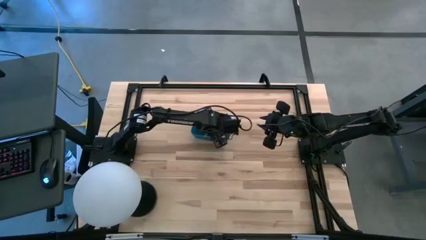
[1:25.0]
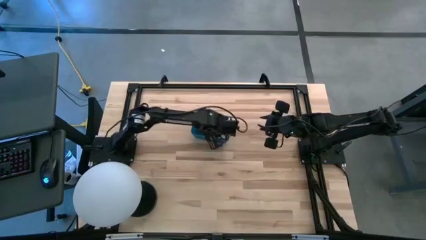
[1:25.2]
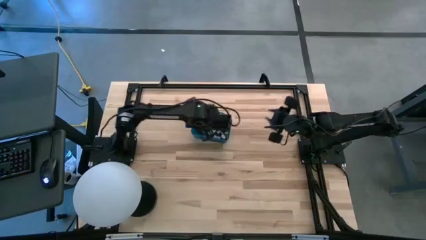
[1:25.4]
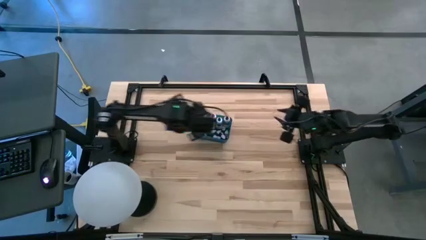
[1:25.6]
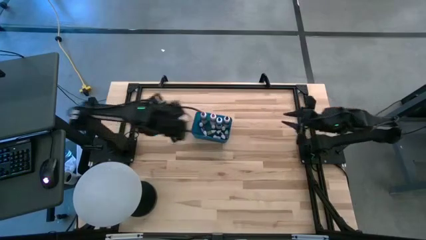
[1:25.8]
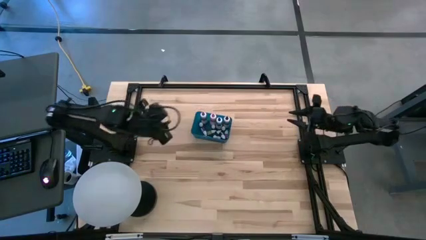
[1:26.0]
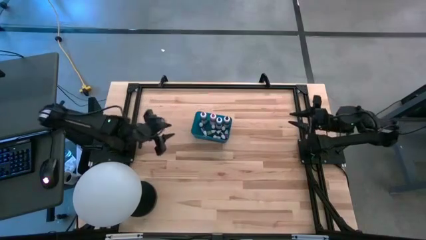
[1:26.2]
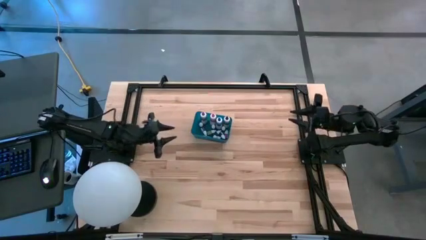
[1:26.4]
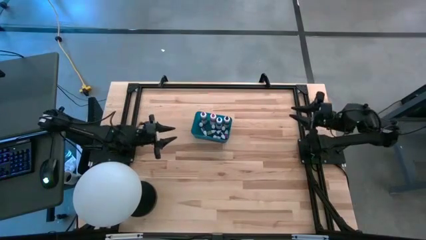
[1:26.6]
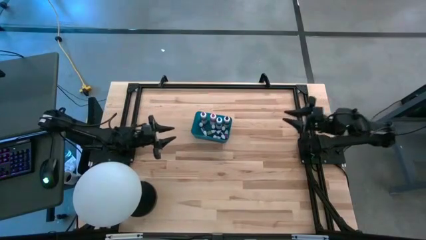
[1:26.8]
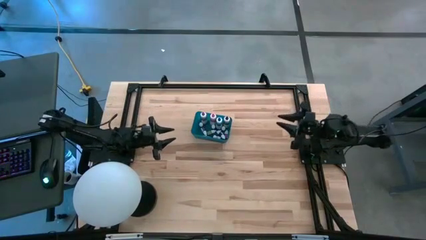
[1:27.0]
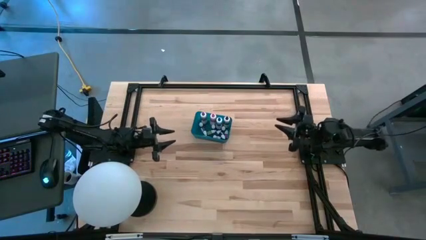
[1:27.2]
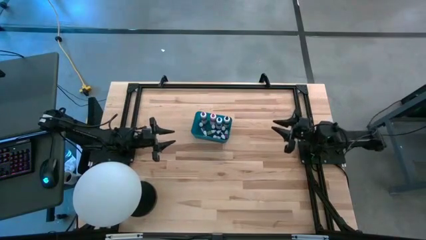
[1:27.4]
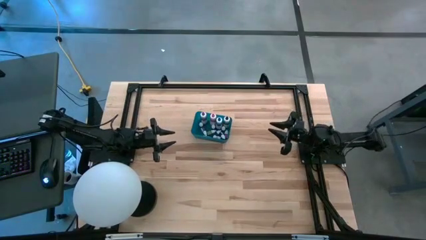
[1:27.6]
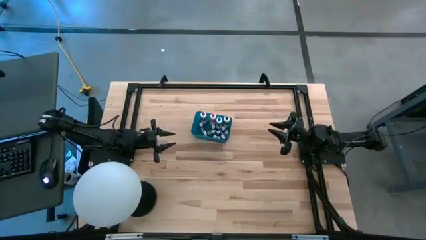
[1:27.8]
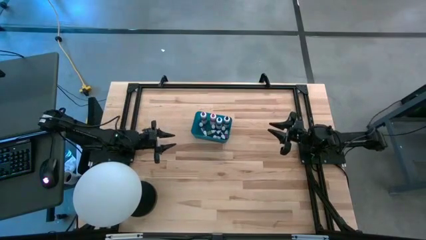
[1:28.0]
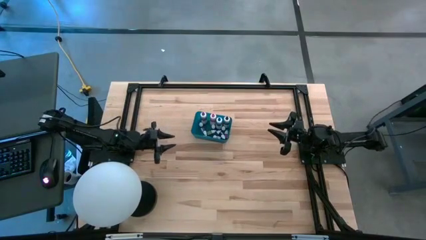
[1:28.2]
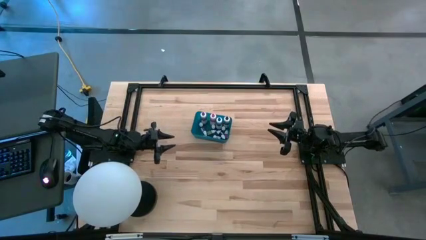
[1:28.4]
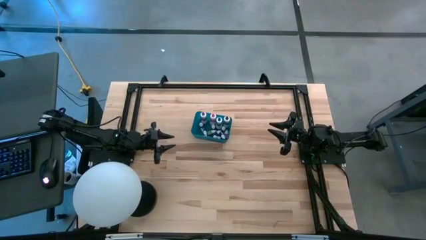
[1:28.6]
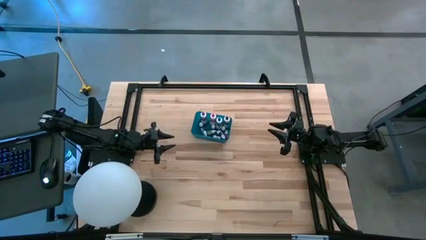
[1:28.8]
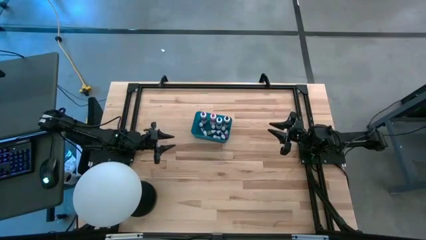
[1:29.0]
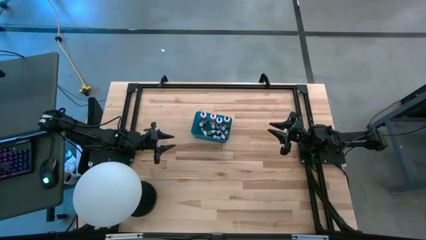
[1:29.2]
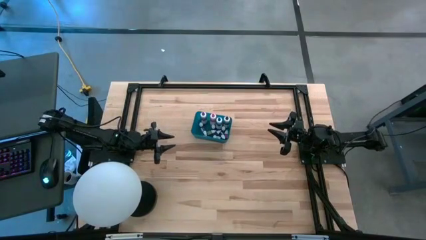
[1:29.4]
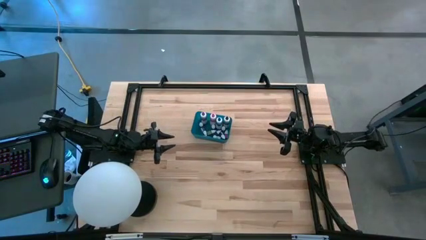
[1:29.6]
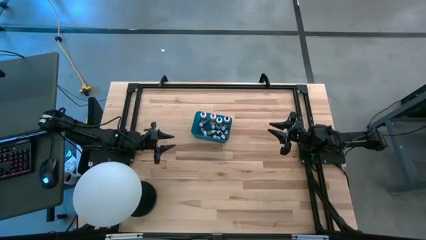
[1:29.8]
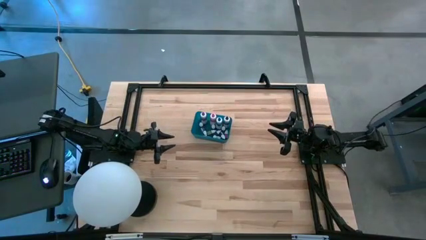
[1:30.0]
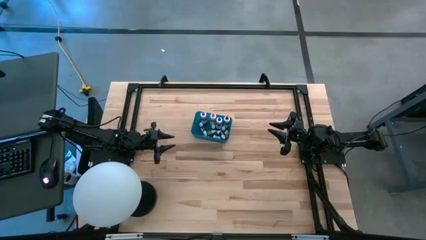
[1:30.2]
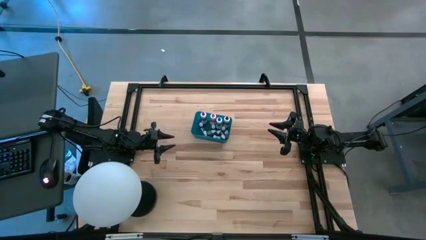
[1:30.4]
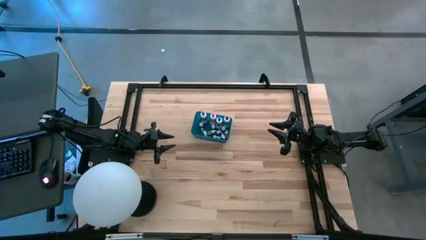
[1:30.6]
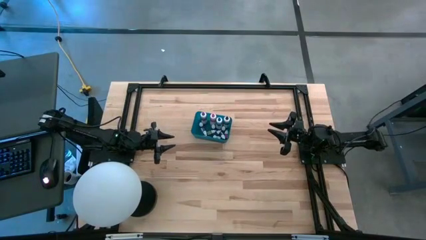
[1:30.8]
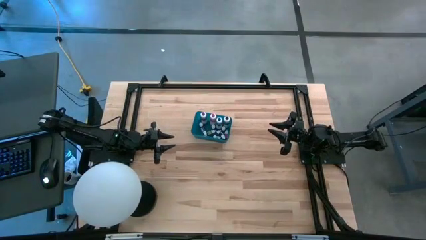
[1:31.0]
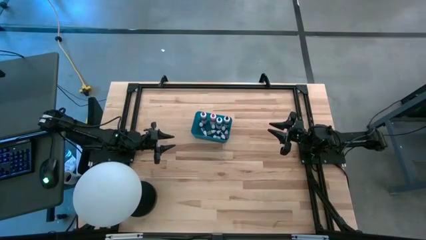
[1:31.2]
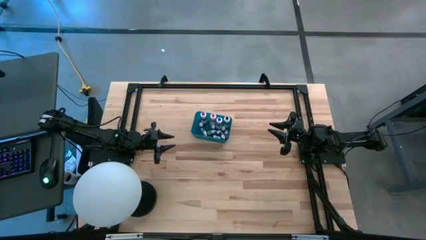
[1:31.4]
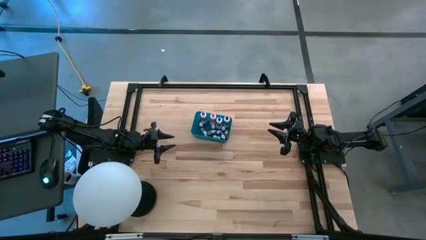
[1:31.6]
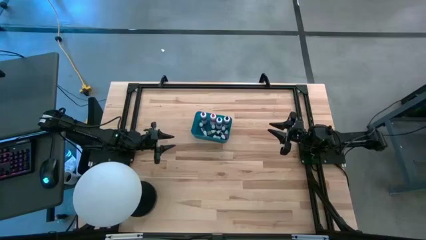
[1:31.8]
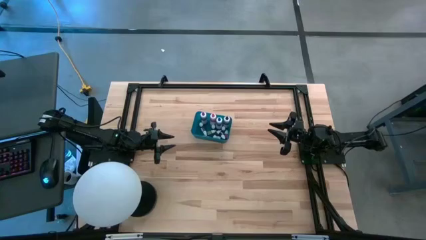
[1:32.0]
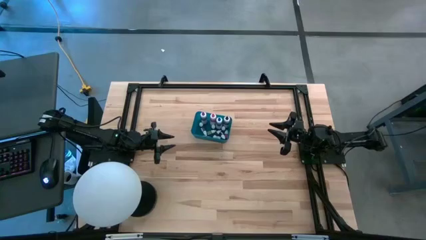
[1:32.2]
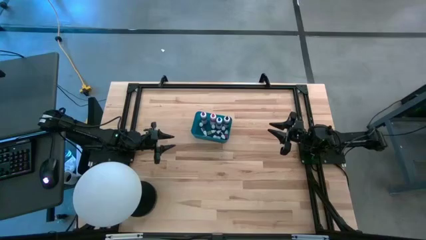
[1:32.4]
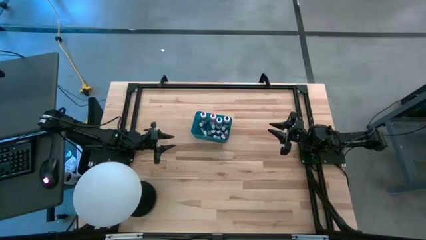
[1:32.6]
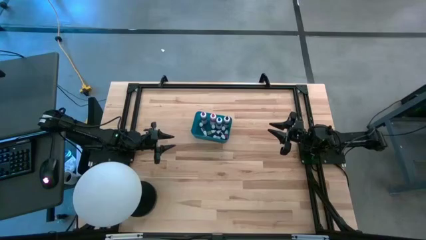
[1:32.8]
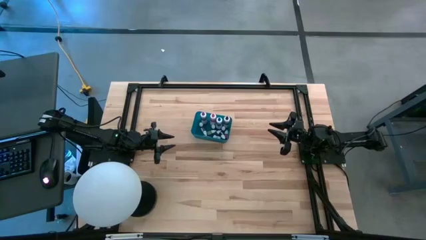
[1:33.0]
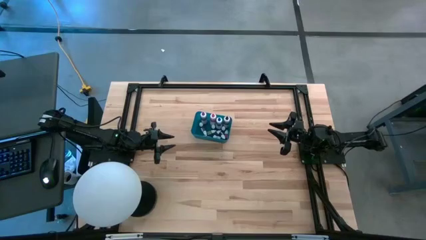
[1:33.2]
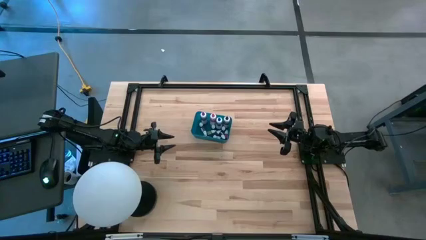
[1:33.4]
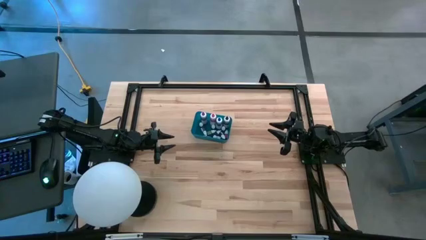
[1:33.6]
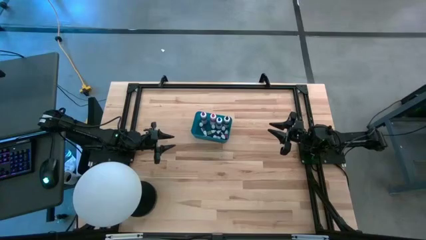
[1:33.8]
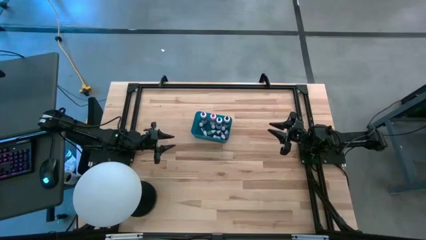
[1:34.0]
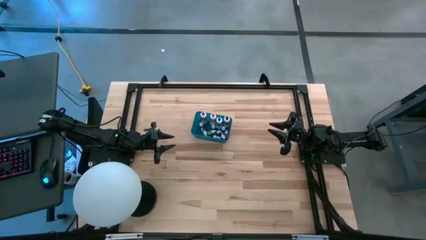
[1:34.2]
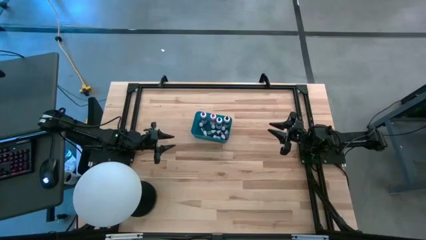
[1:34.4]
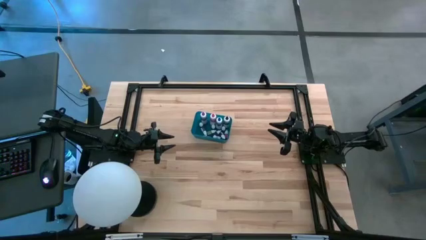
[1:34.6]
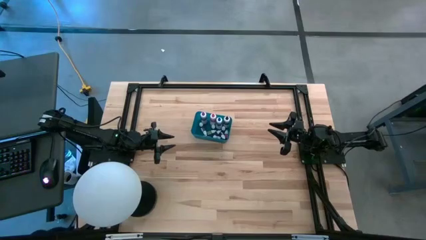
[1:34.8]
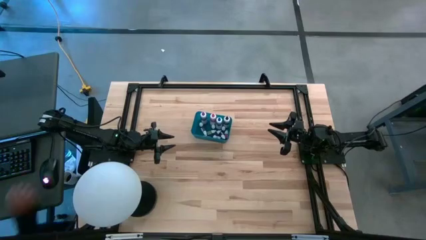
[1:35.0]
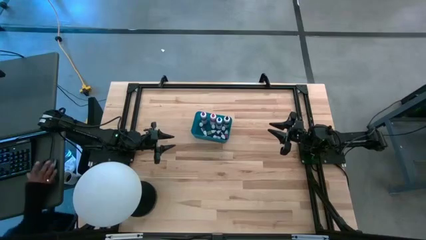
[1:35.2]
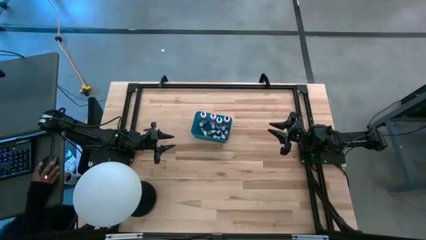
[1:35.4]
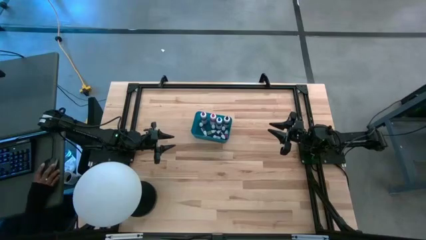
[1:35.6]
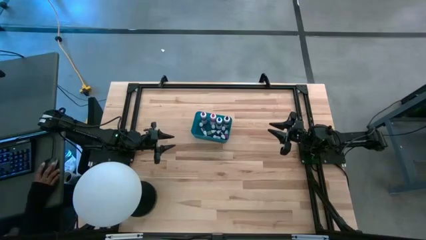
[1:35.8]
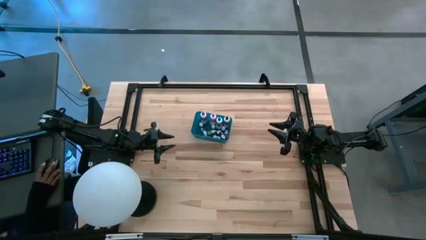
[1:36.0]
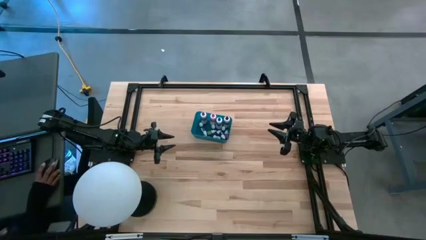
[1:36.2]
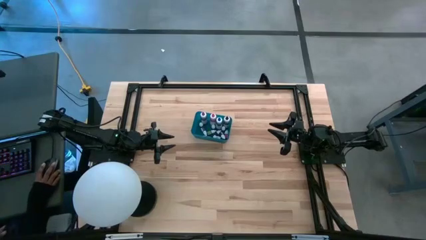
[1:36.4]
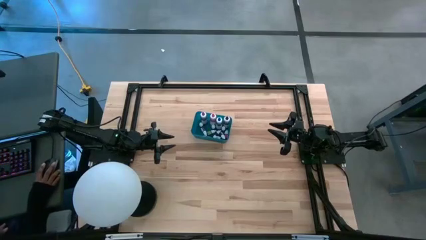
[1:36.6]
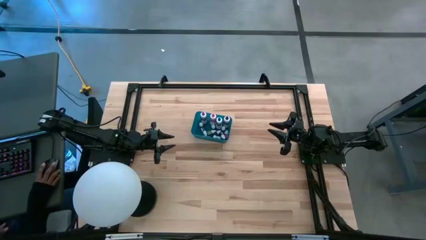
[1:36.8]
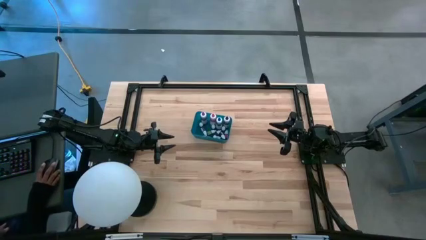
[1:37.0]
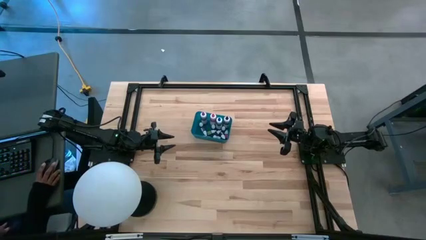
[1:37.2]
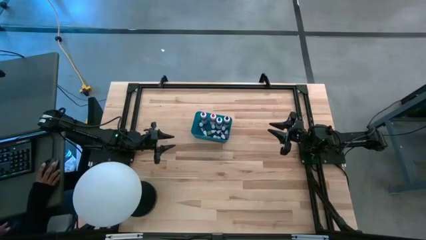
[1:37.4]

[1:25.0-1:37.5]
Task: Pick & Place food coloring
Return to Home Position
